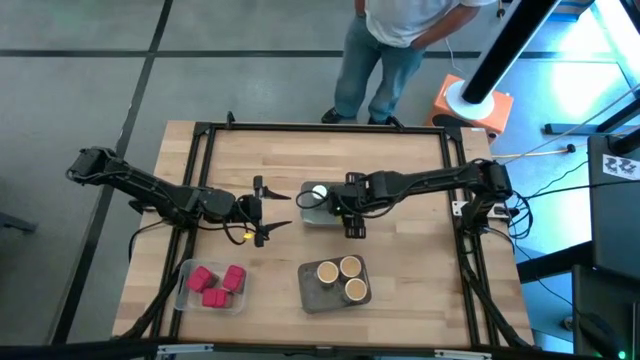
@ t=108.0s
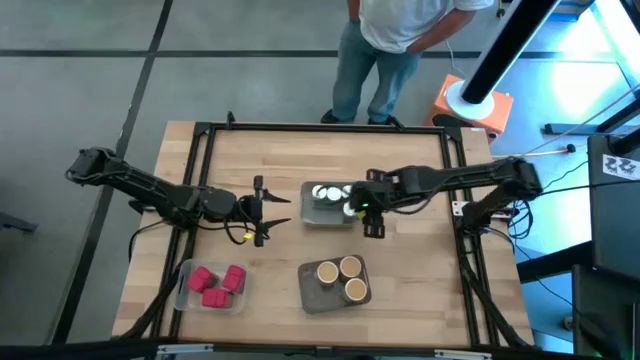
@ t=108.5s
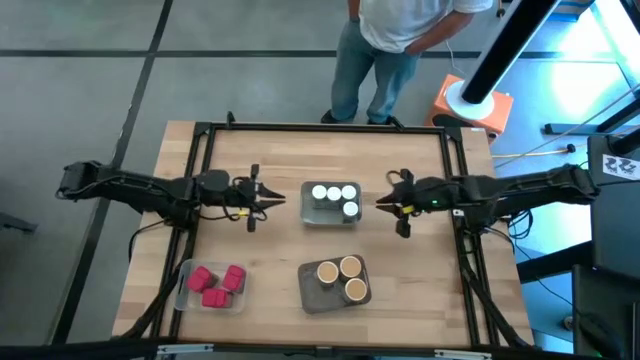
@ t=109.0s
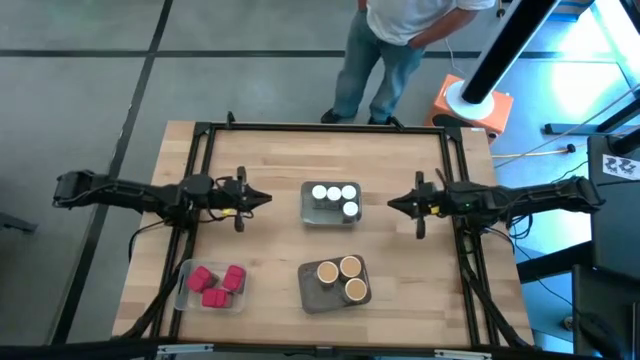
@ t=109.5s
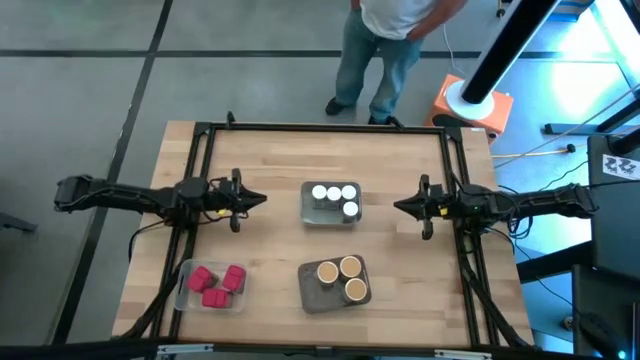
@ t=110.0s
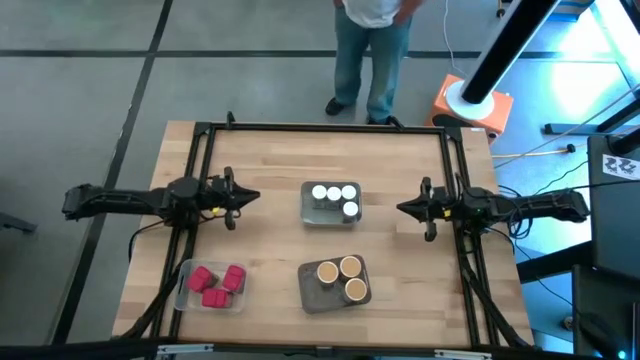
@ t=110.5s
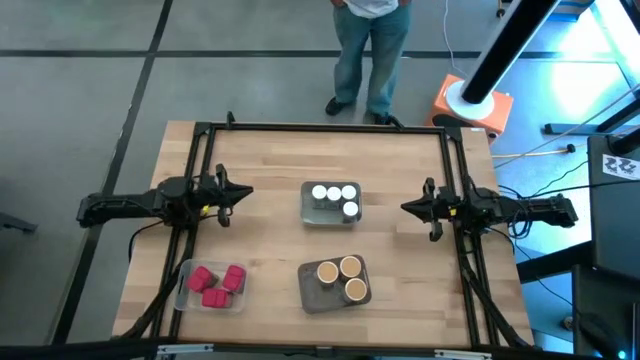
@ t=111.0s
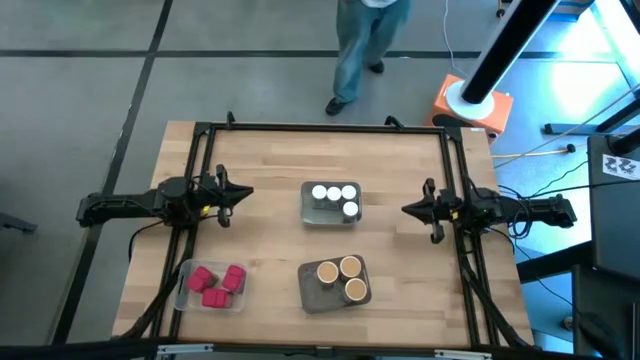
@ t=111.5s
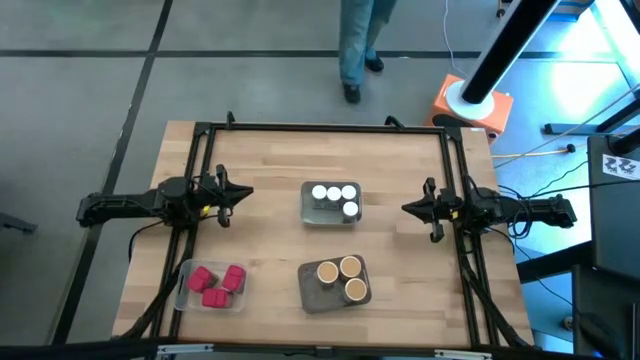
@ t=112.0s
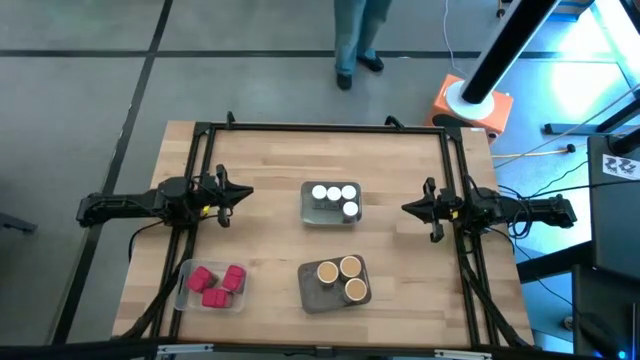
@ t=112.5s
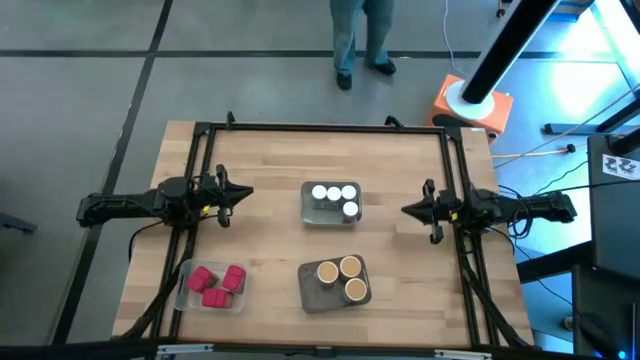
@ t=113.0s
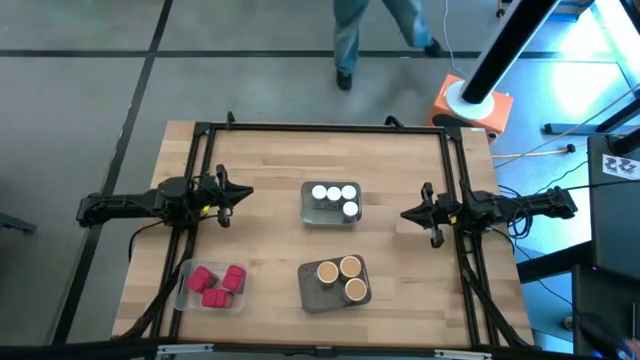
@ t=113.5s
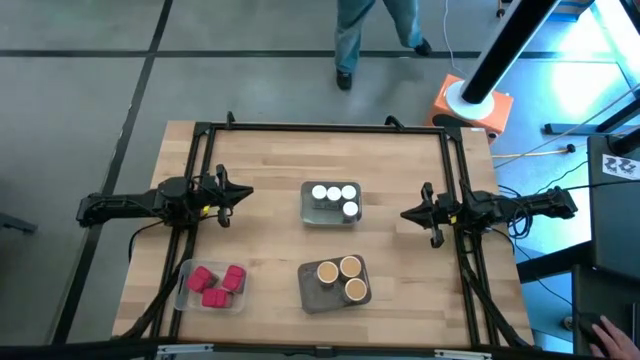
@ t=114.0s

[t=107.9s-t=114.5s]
Task: Sort spices by type
Return to Home Position

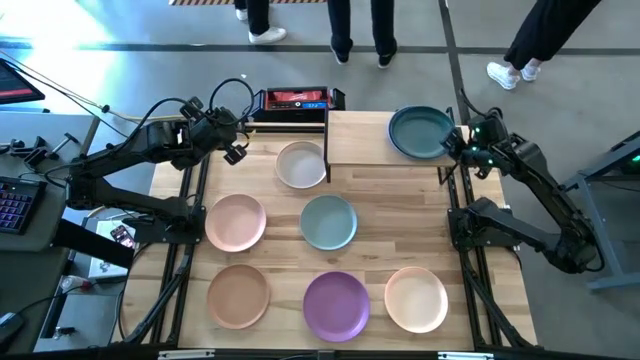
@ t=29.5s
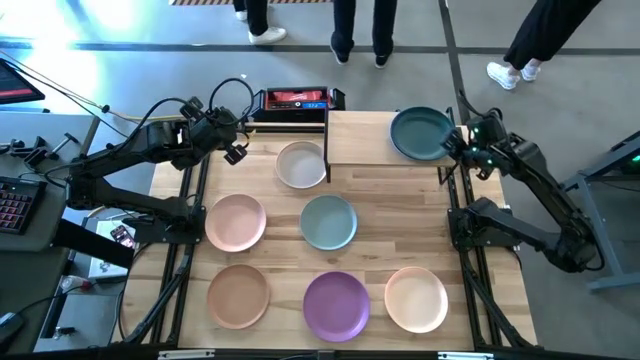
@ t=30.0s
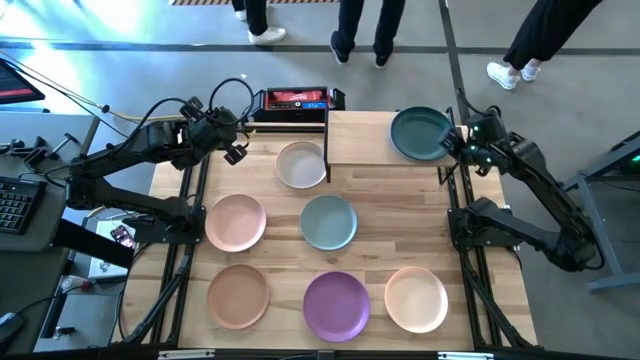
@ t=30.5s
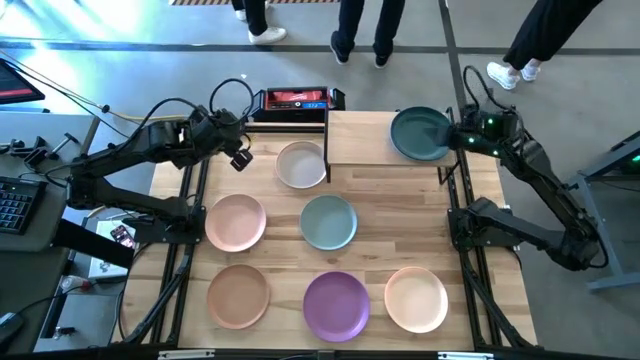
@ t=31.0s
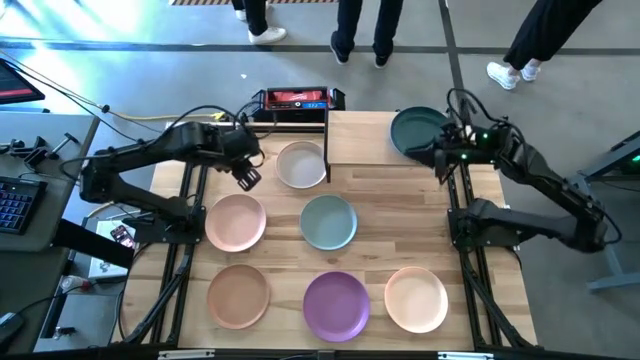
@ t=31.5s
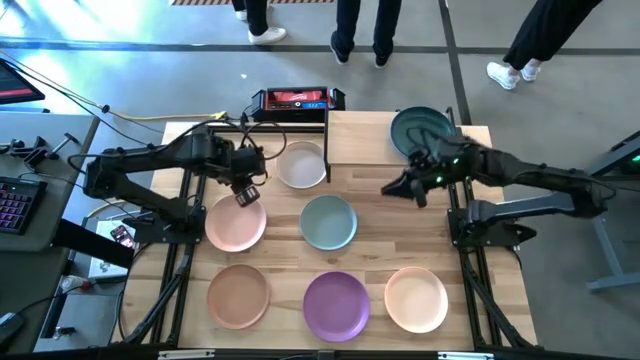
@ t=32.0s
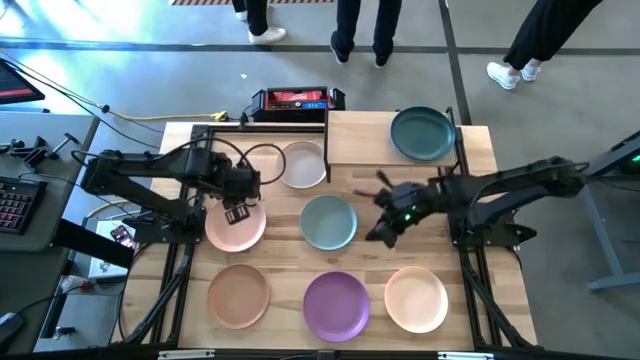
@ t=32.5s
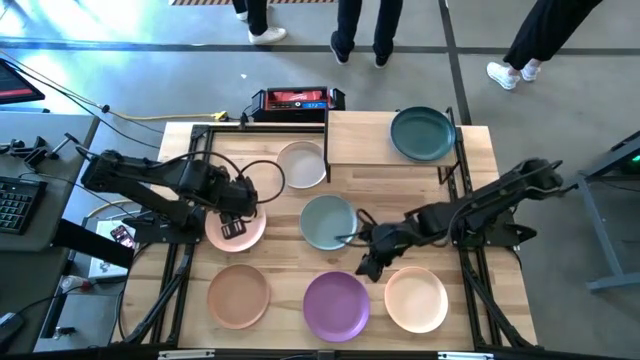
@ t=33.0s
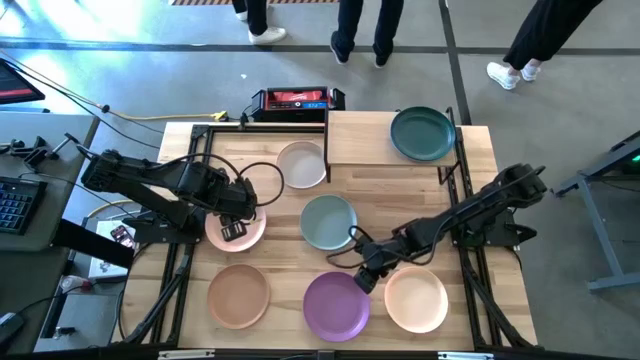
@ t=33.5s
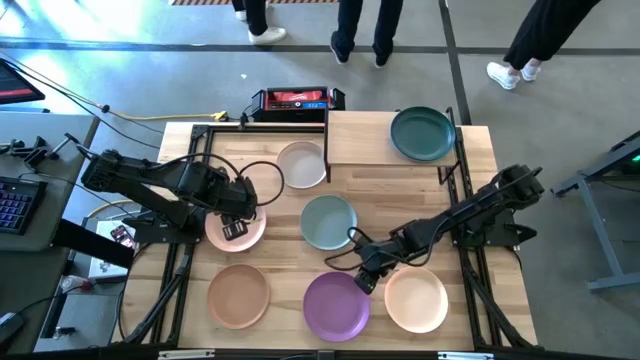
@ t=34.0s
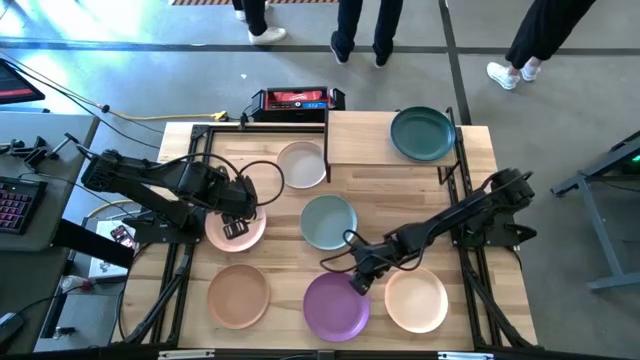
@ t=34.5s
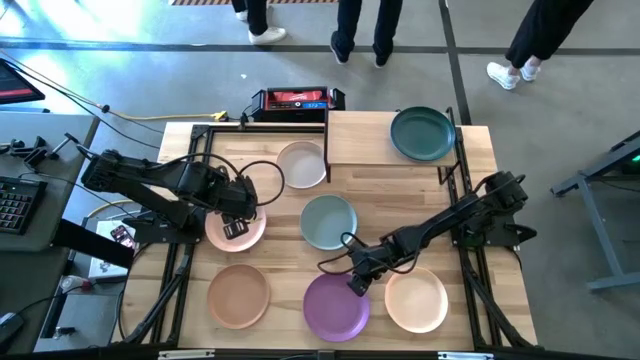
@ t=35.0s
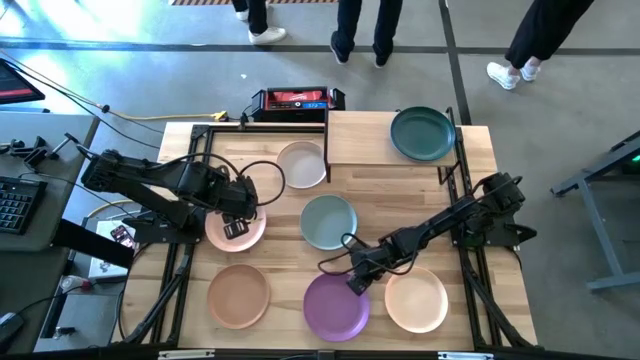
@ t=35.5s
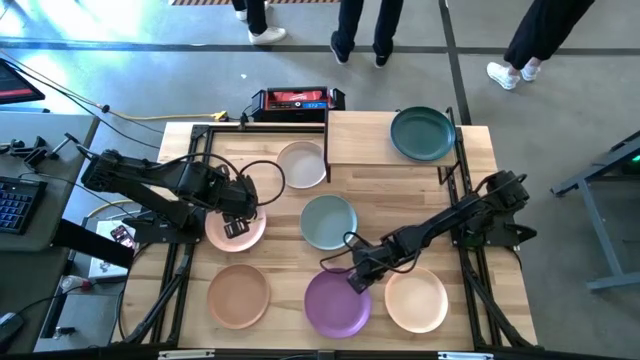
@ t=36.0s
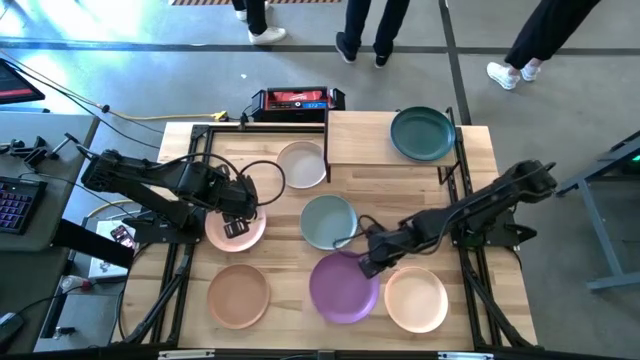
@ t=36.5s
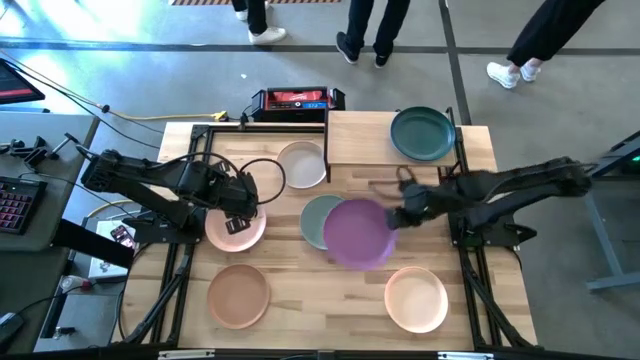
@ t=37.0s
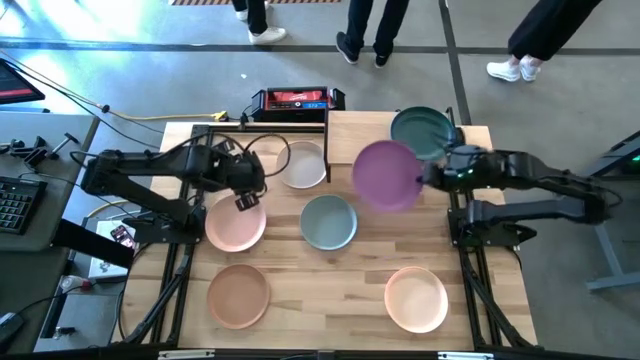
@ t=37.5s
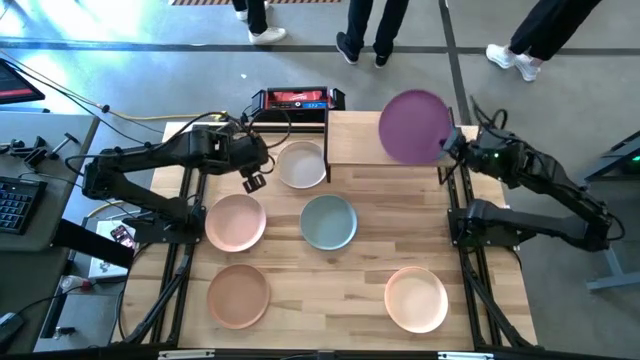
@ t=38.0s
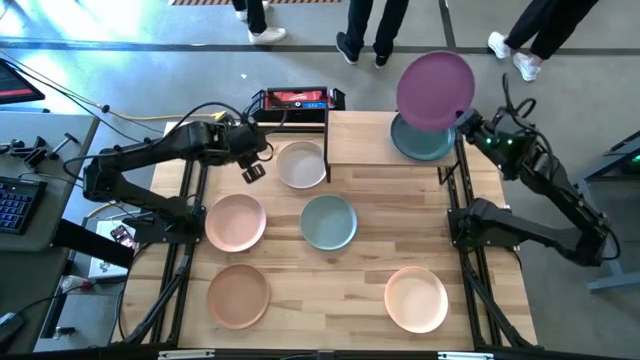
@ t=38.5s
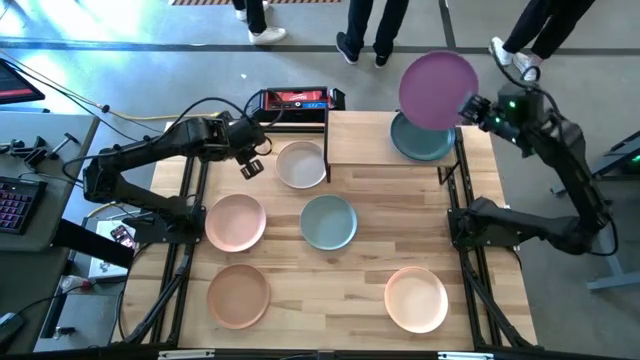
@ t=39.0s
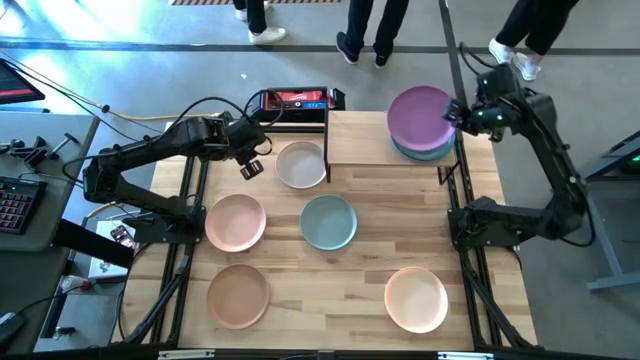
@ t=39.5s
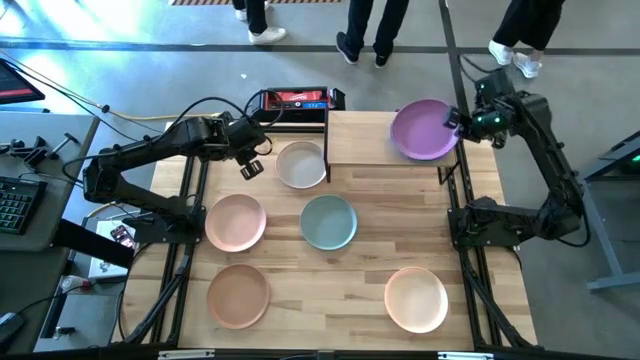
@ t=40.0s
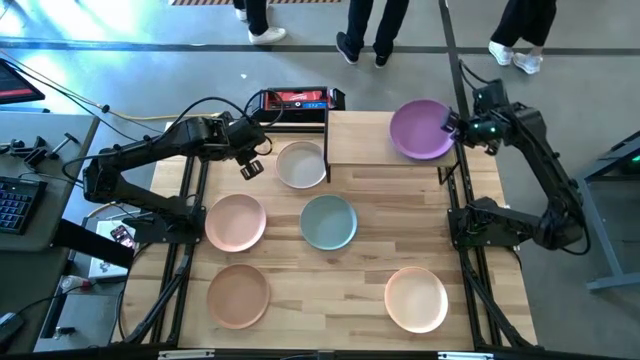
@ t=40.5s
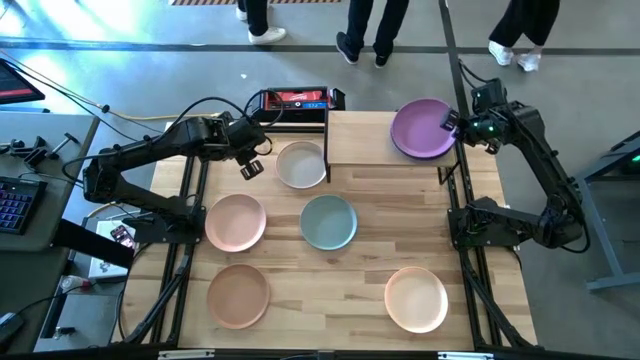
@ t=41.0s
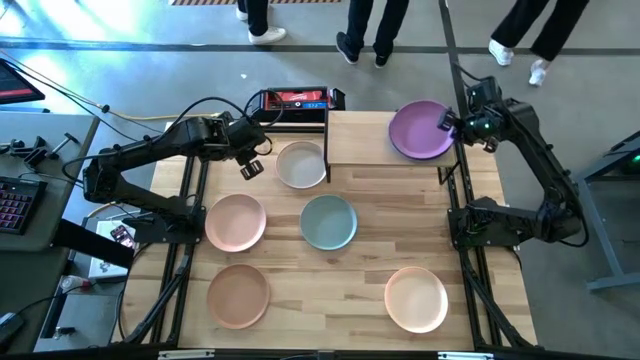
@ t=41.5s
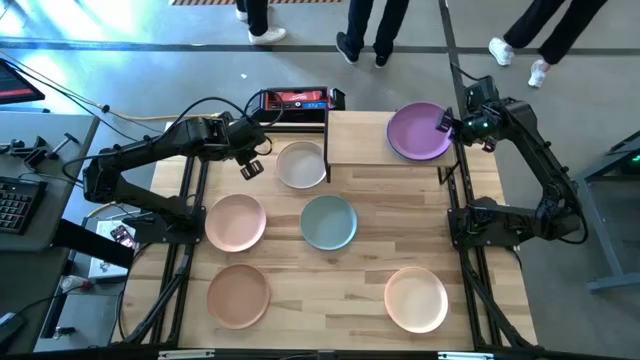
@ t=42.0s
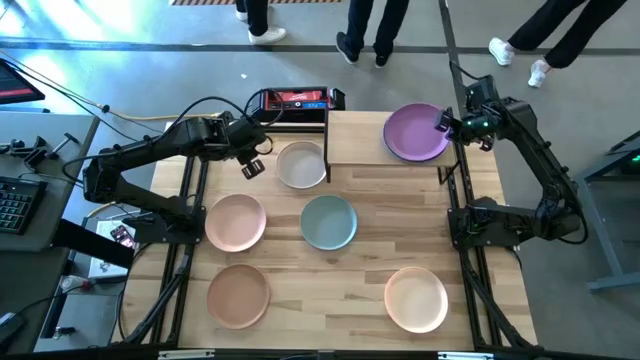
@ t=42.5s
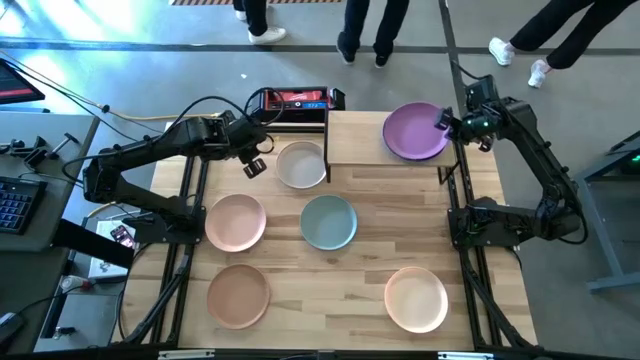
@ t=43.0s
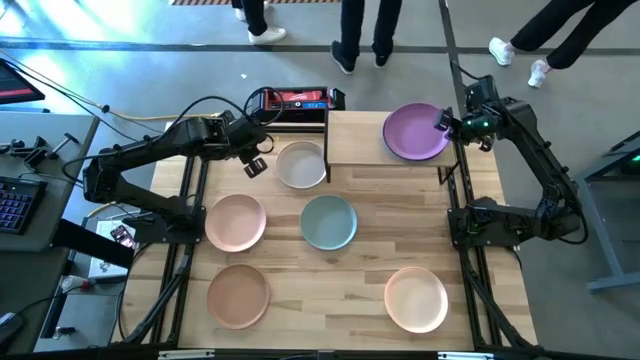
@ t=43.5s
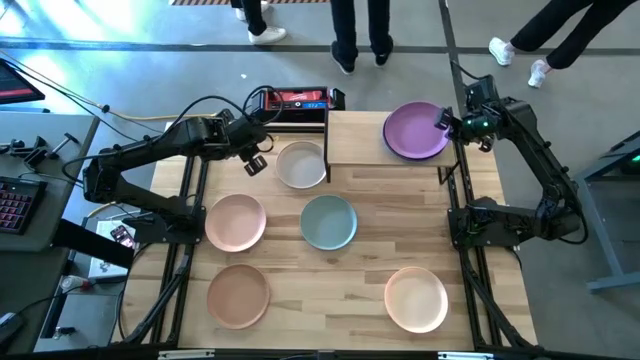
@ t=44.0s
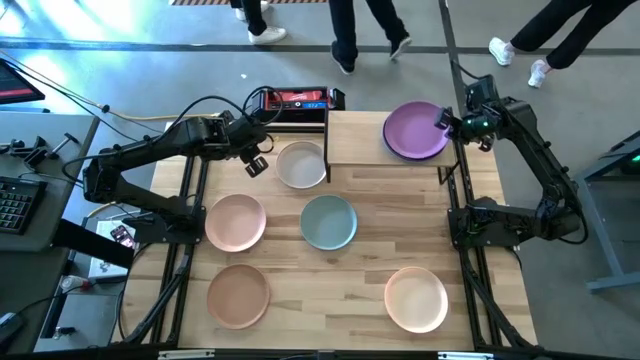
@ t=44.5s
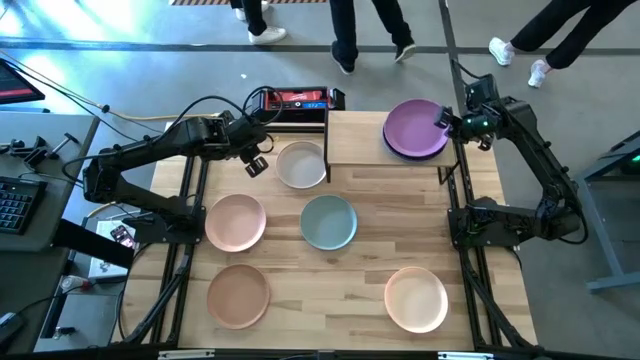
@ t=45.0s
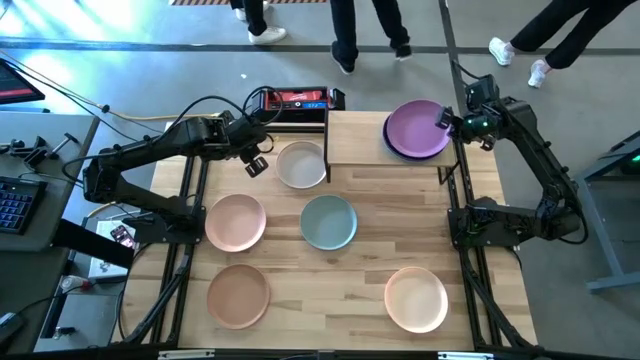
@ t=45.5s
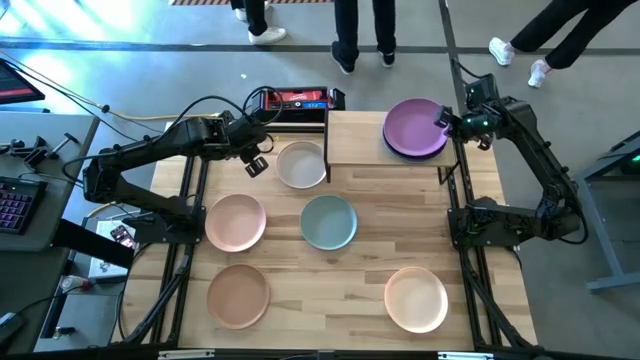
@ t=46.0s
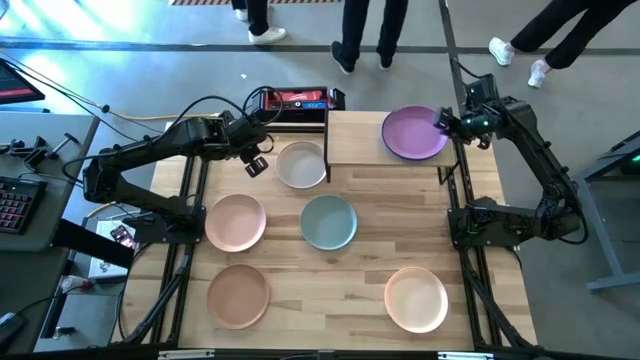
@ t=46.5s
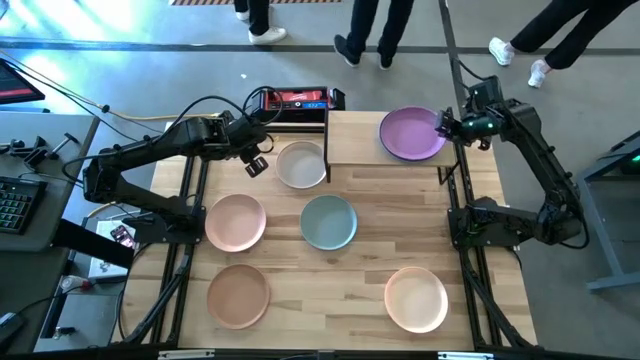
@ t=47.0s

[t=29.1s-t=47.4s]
Task: Place and stack plates onto a shelf
Stack the purple plate on top of the green plate on the shelf
